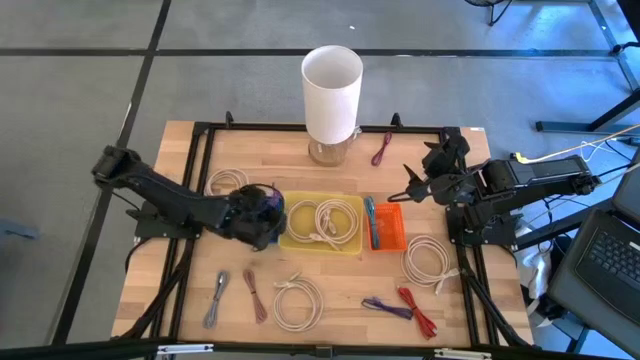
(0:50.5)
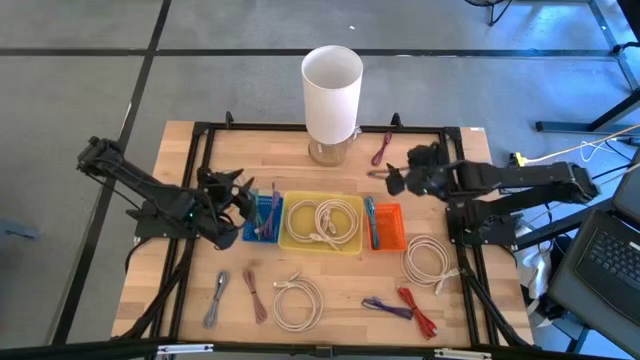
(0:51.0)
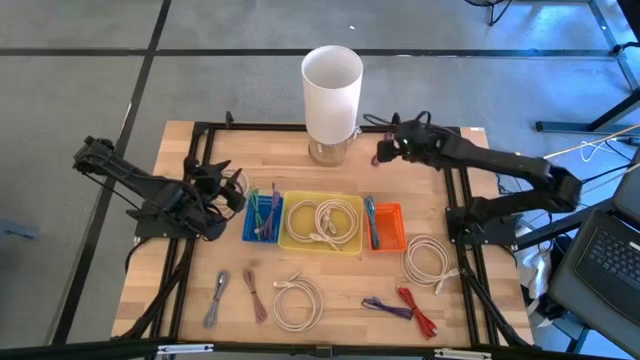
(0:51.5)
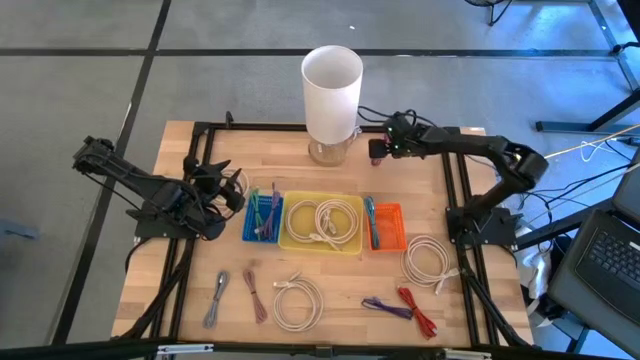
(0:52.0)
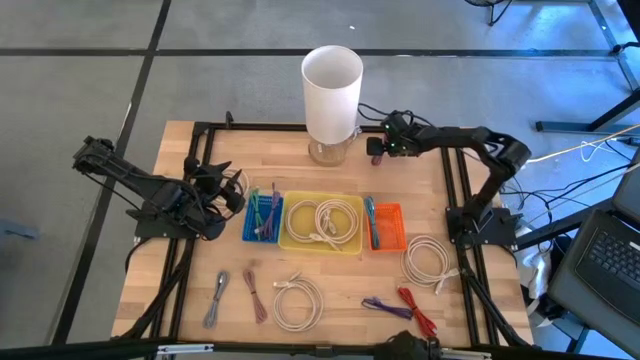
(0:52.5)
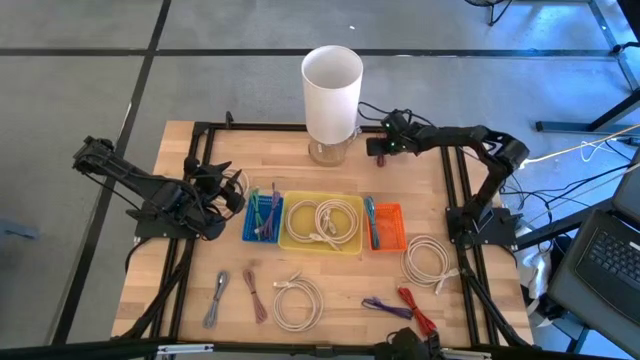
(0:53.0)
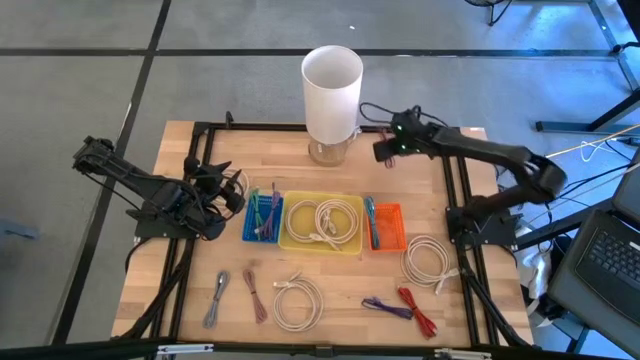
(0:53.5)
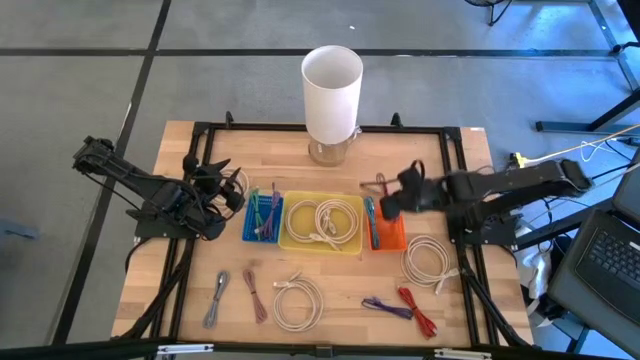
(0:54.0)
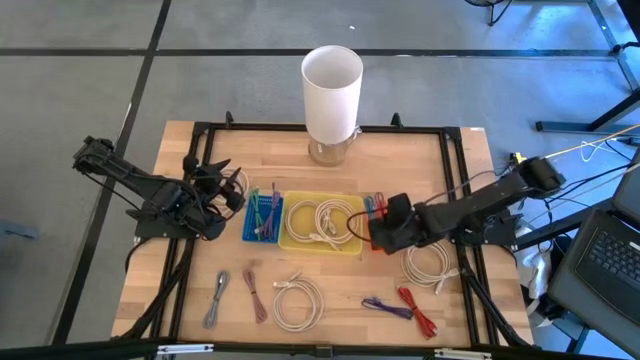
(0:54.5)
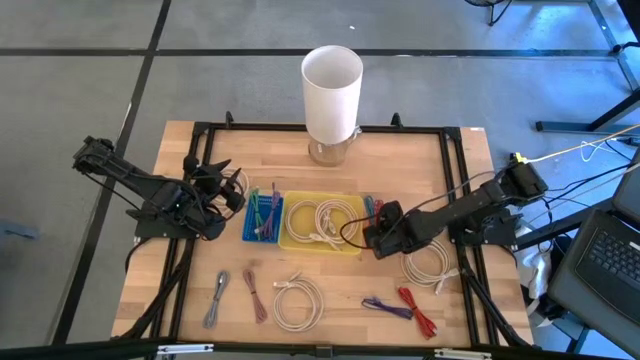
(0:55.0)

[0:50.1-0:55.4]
Task: Pick & Place USB Port
Put the pink patterned USB cable into the orange bin

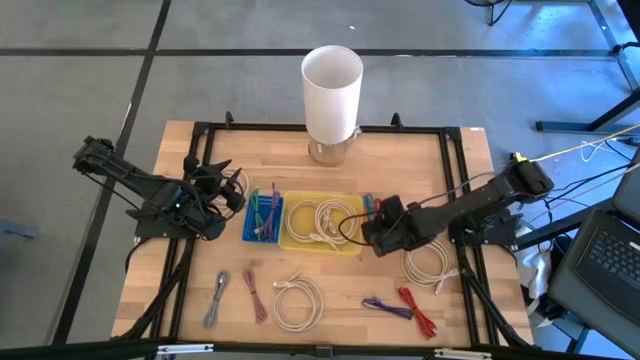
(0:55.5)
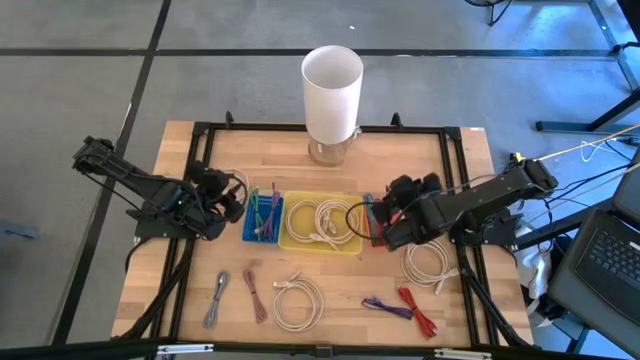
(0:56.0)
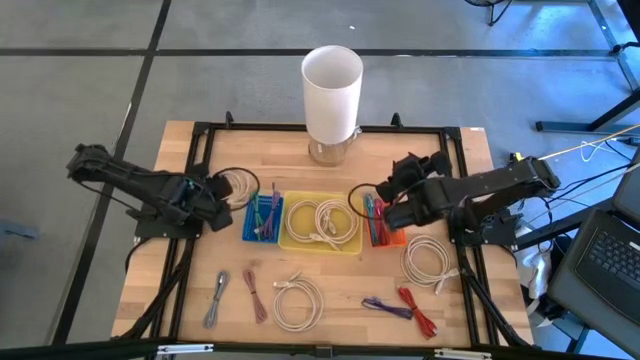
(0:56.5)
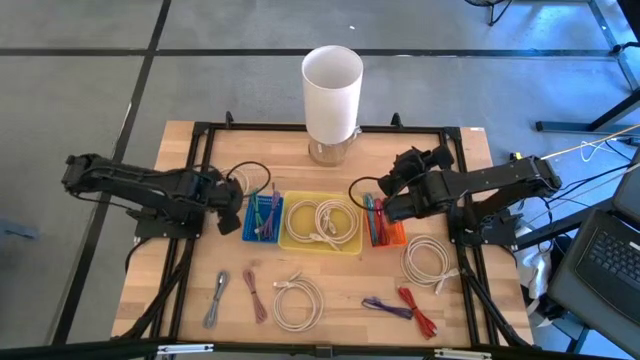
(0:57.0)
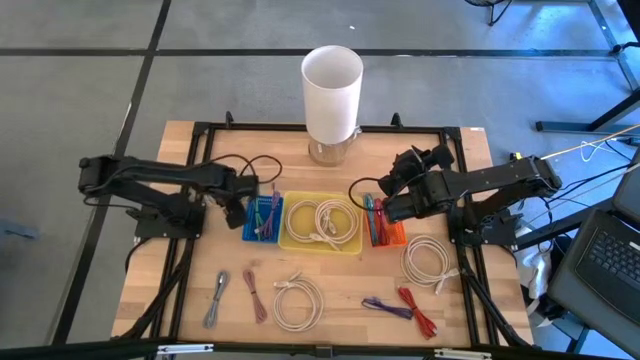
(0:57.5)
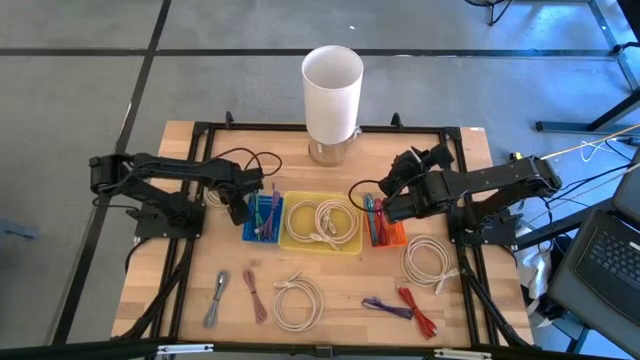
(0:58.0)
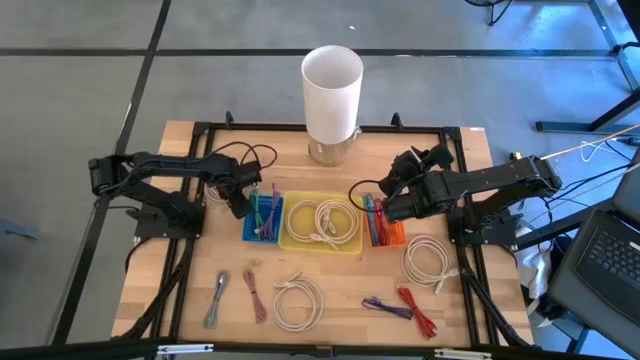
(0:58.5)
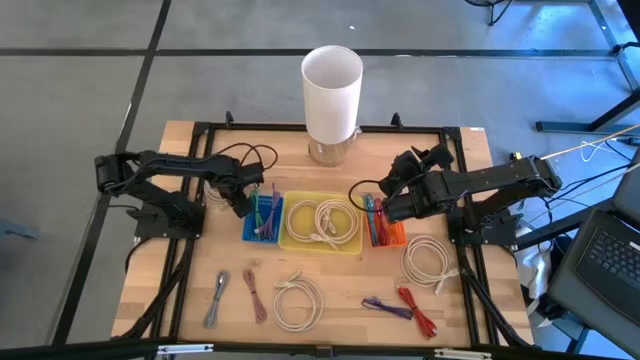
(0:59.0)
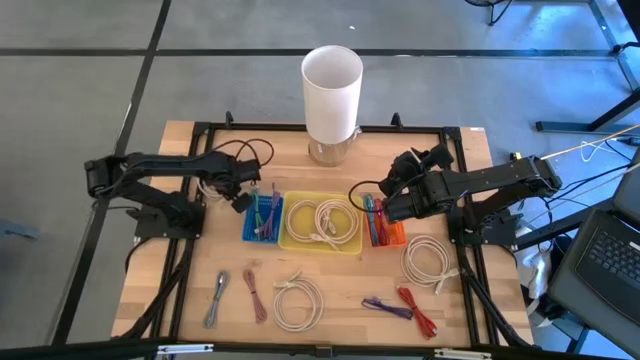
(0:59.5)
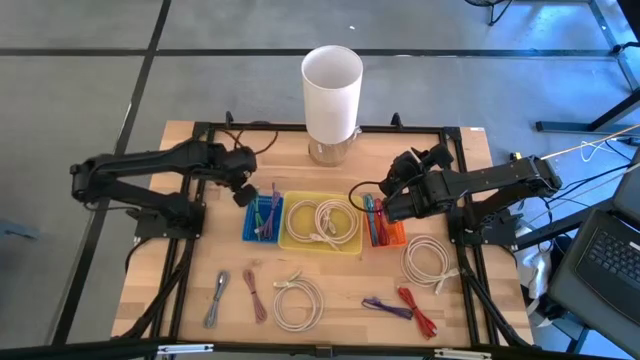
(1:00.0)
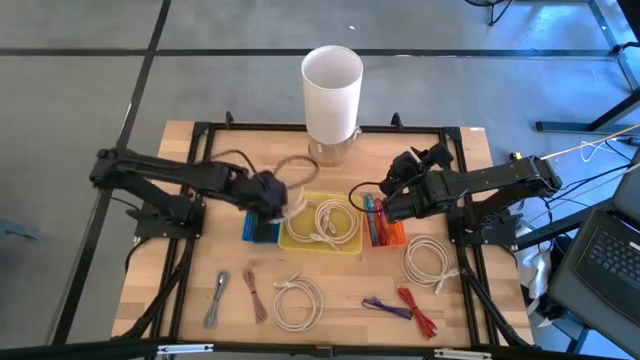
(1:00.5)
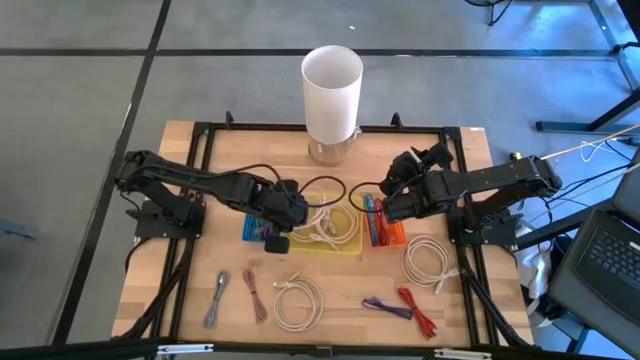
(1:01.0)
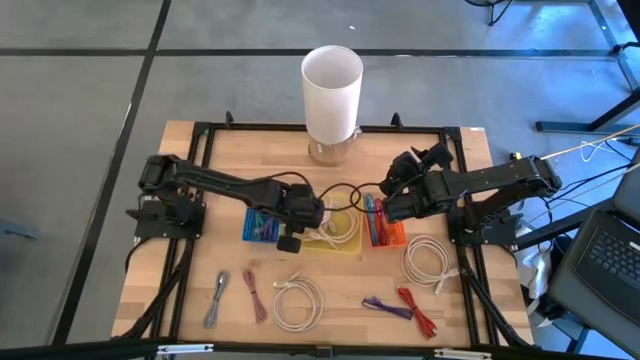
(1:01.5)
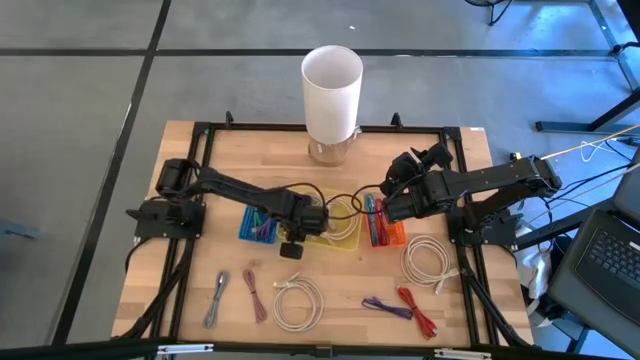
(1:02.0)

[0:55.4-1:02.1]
Put the light brown HDMI cable into the yellow bin

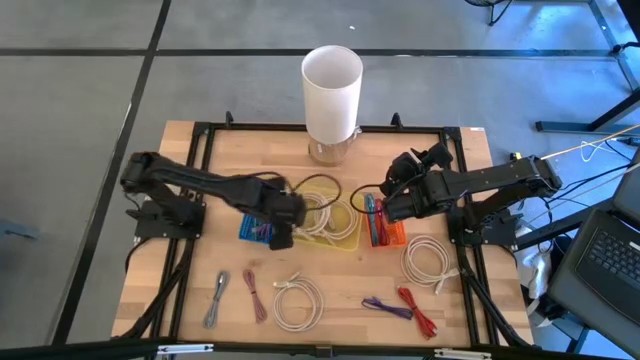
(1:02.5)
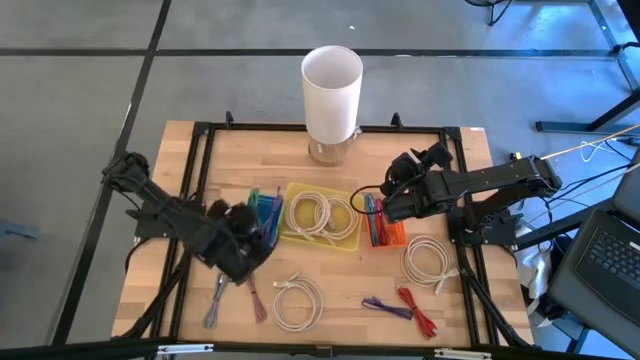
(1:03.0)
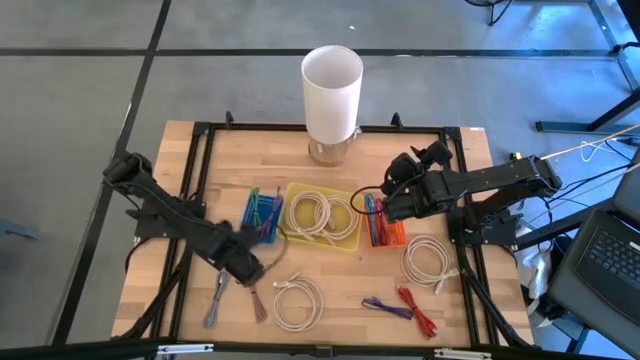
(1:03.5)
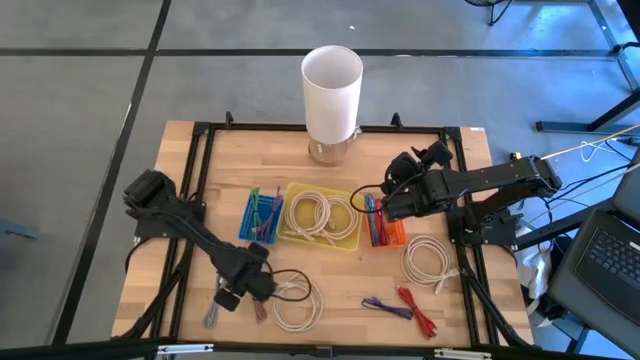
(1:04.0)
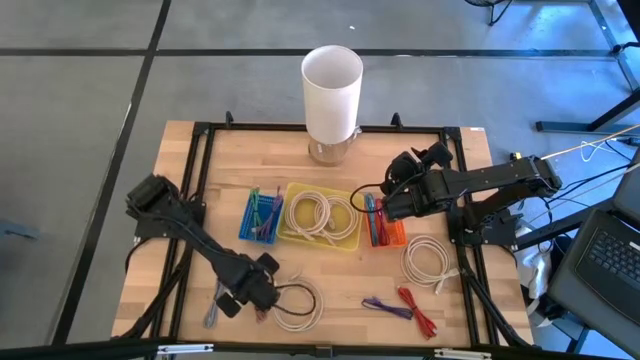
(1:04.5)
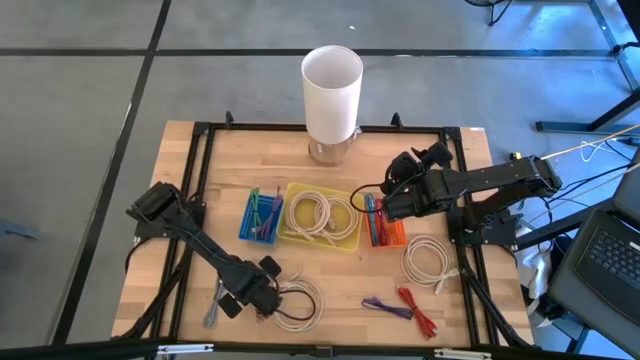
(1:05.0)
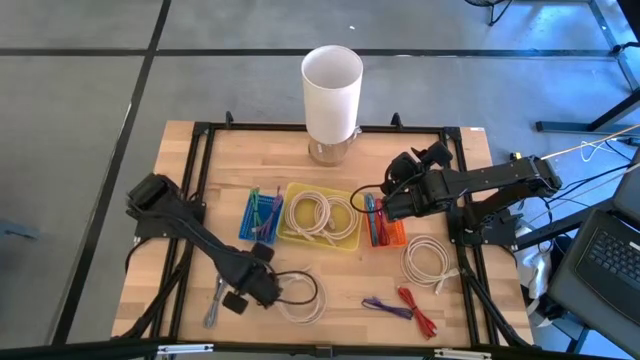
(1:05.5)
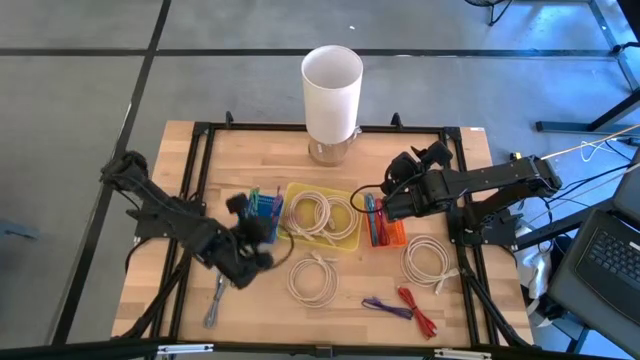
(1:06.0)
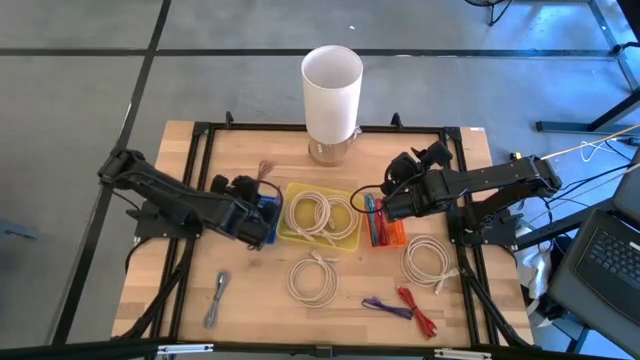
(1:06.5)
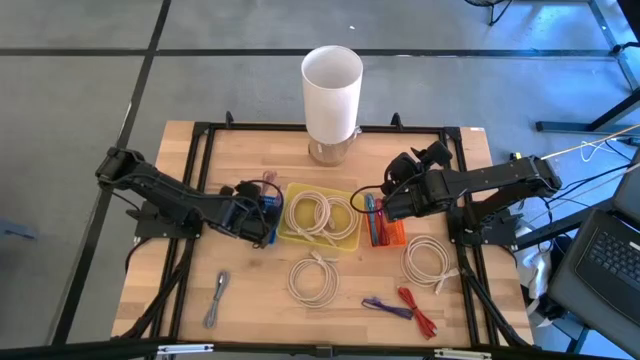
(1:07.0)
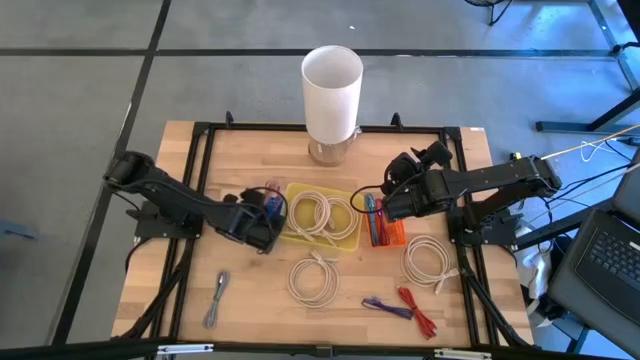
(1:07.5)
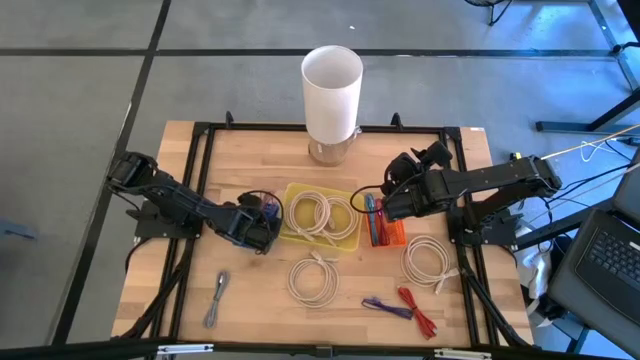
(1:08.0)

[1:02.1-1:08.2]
Put the light pink USB cable into the blue bin

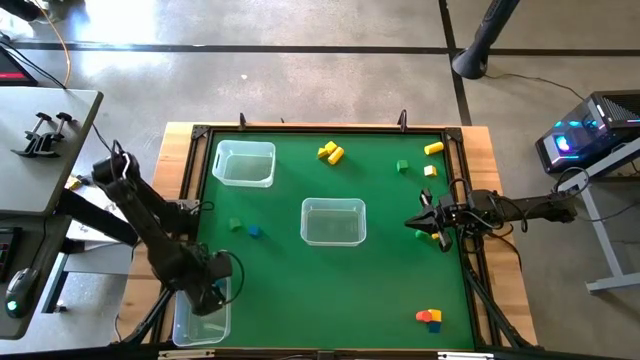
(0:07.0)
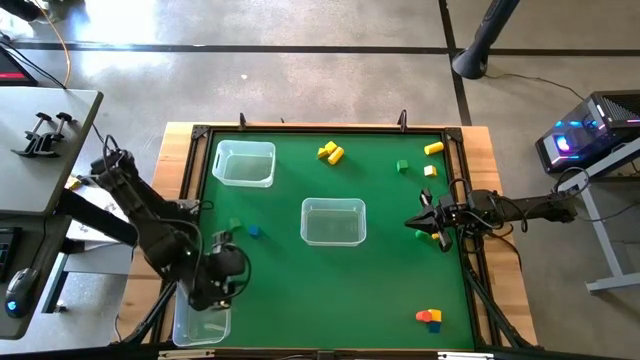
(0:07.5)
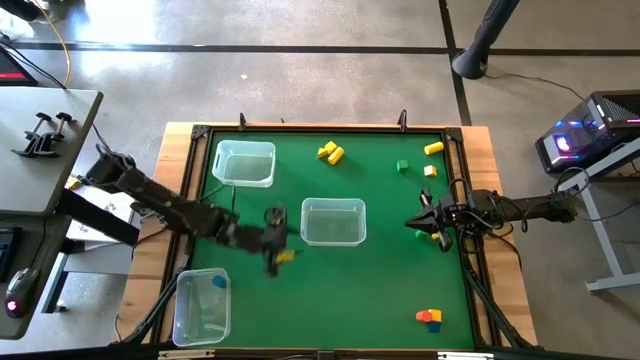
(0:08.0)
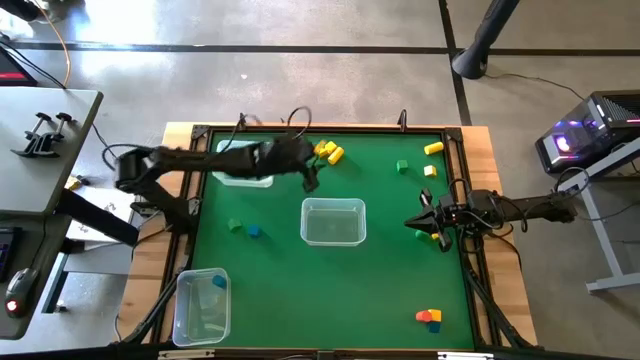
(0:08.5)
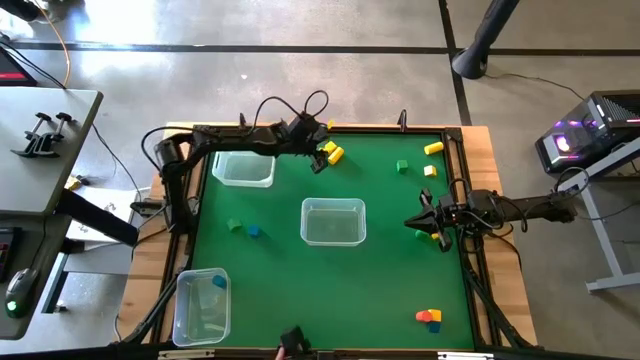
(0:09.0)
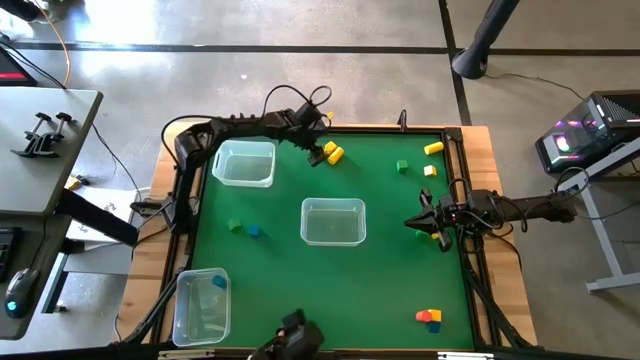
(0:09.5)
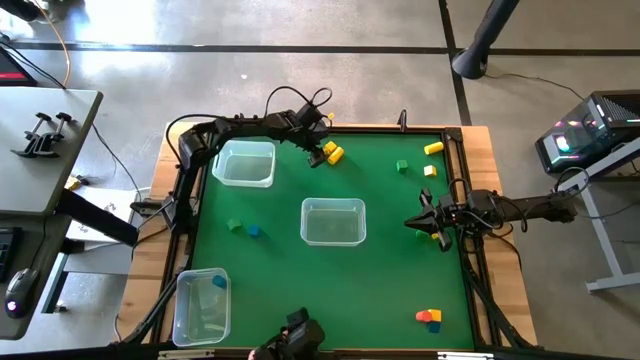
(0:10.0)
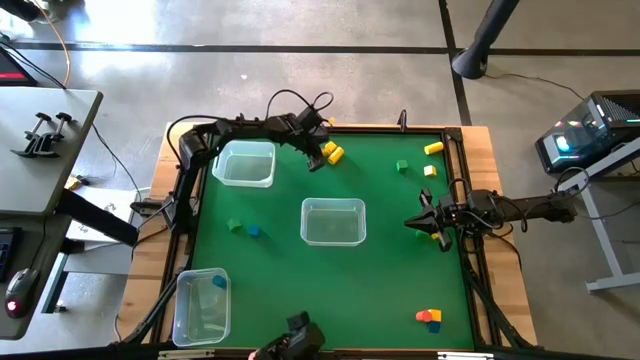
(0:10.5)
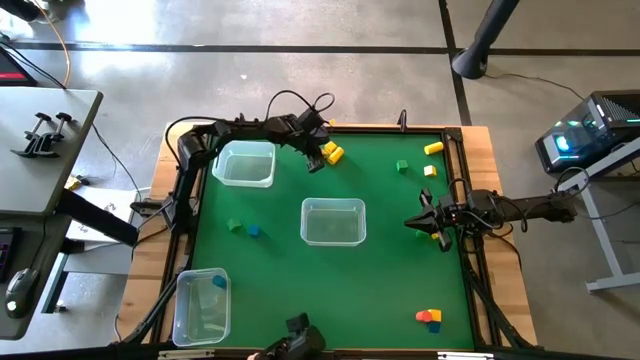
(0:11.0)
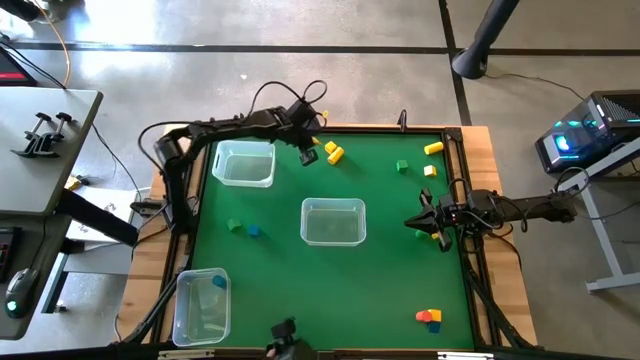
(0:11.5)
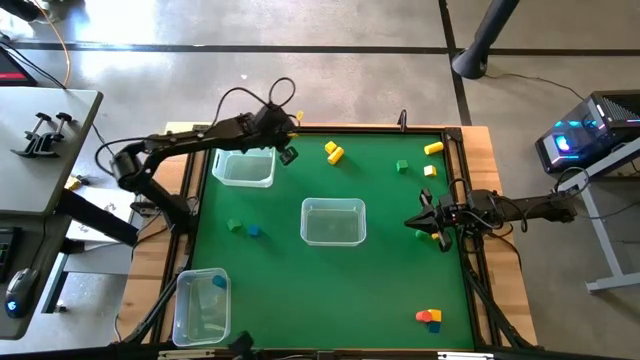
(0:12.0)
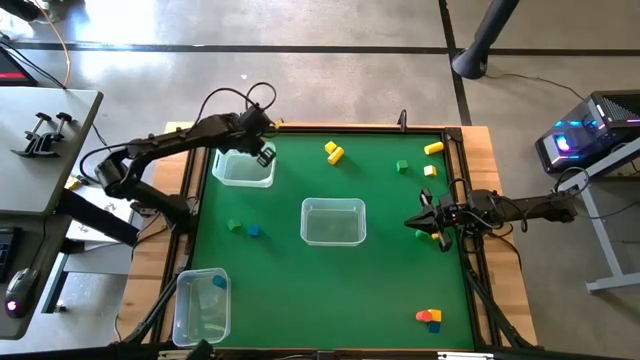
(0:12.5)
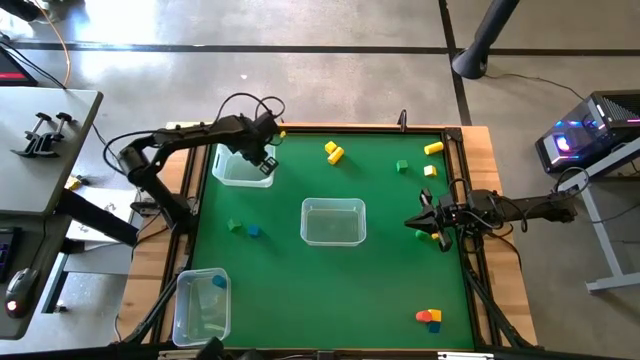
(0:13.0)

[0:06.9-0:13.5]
Task: Sort blocks by size
Put the yellow triangular block into the top left transparent bin
